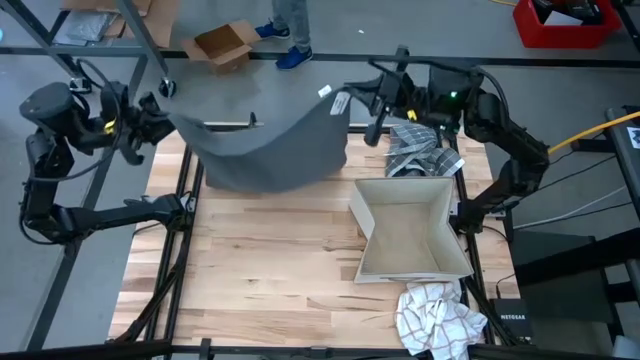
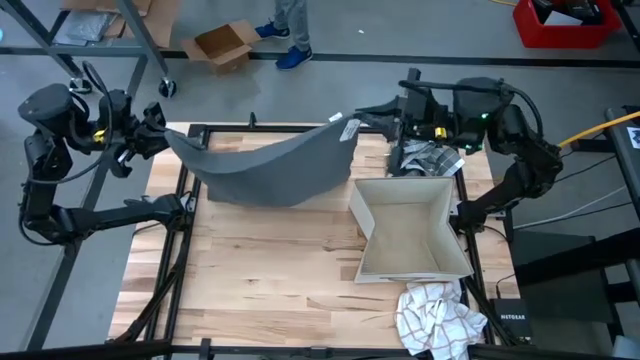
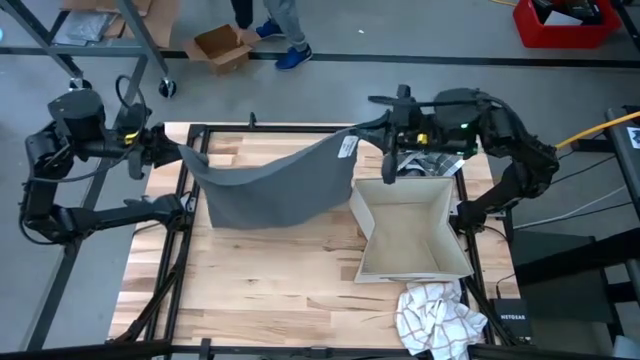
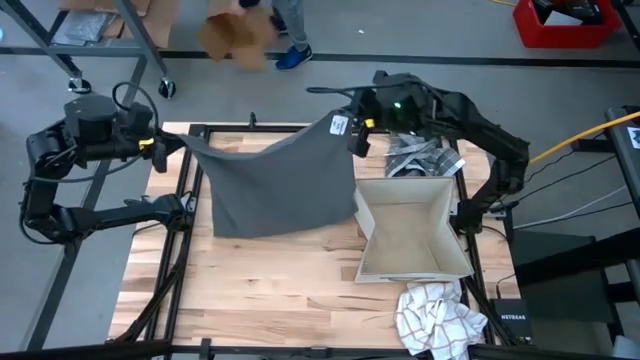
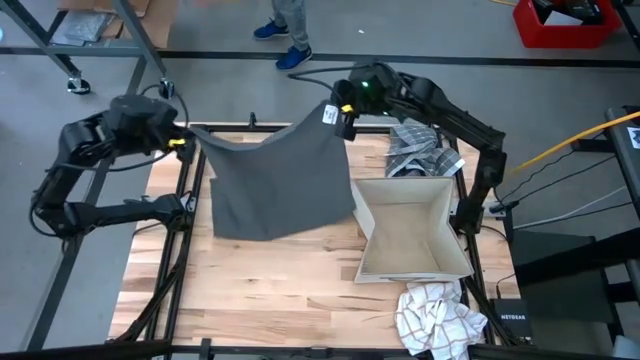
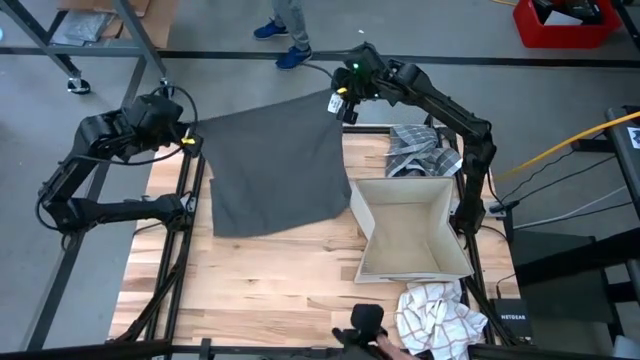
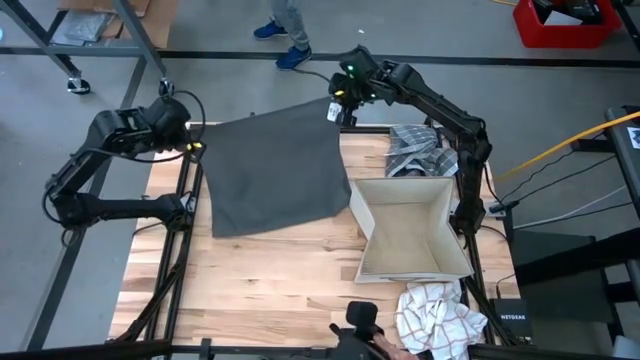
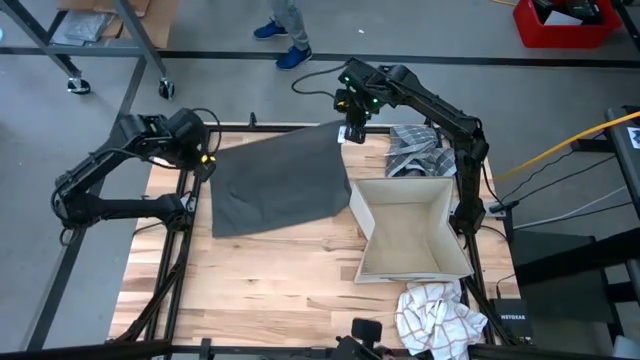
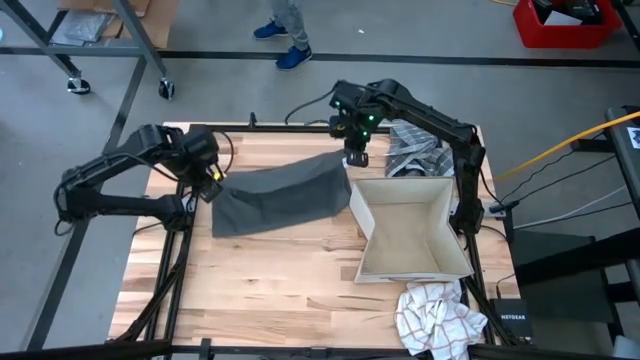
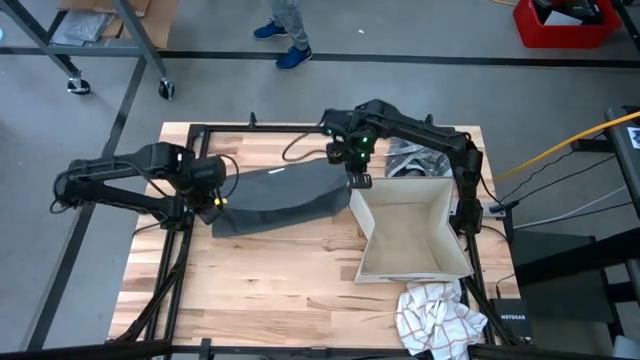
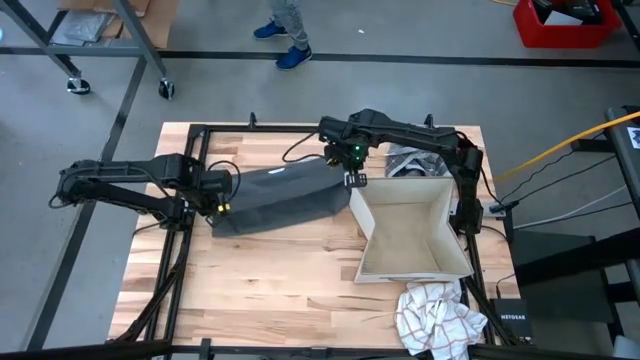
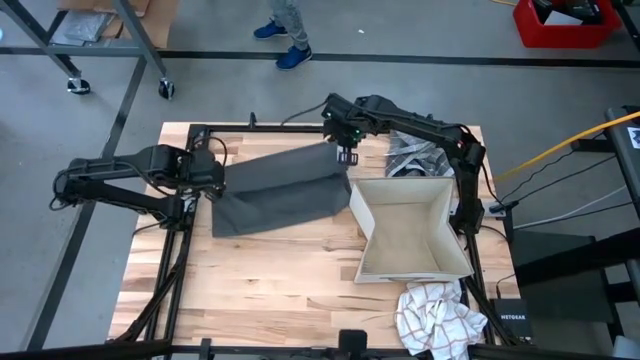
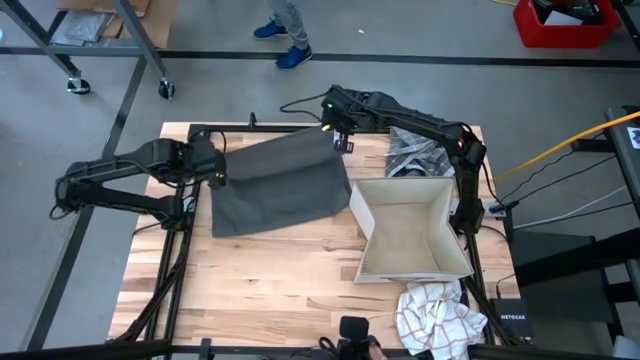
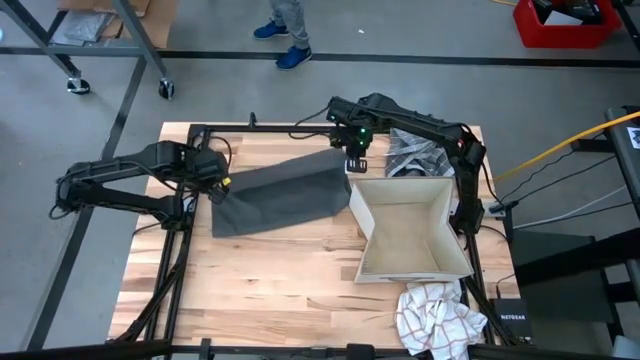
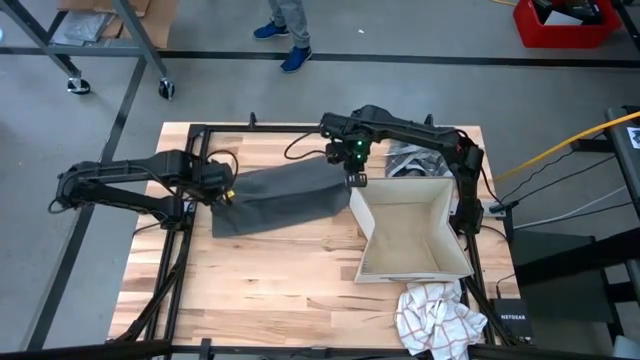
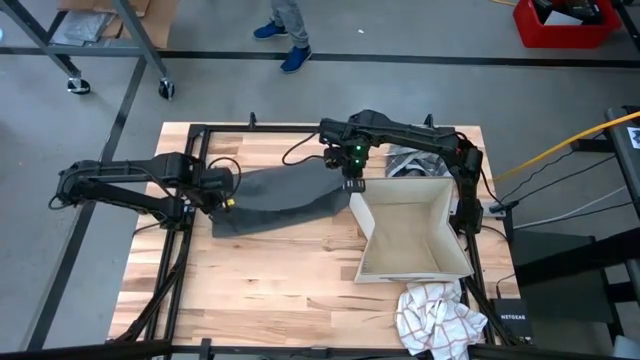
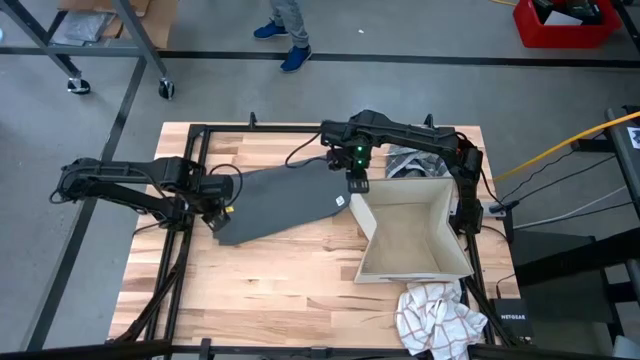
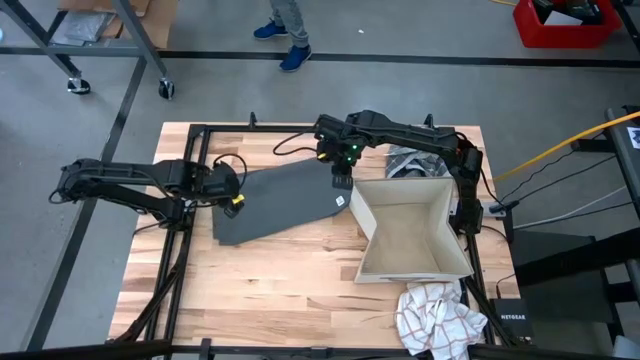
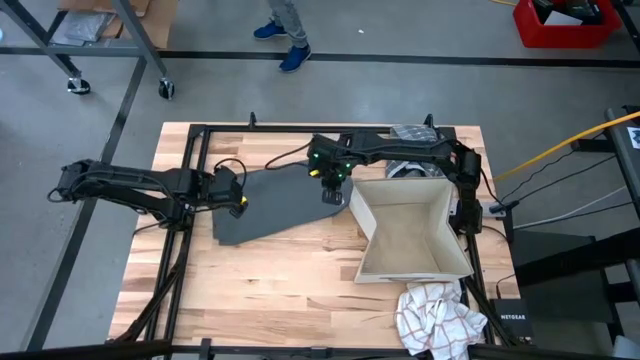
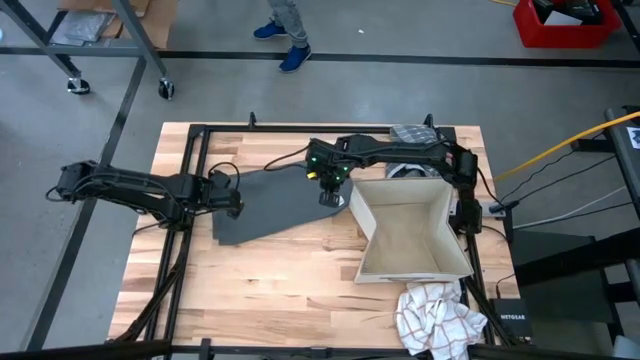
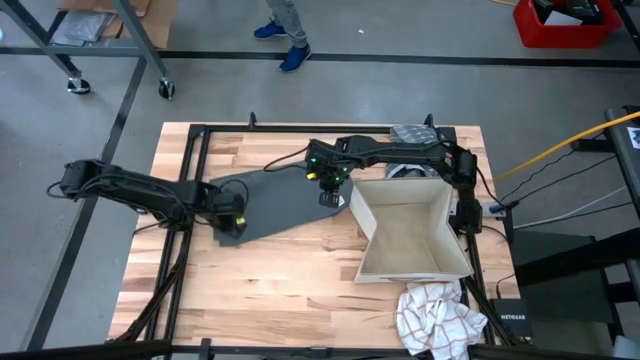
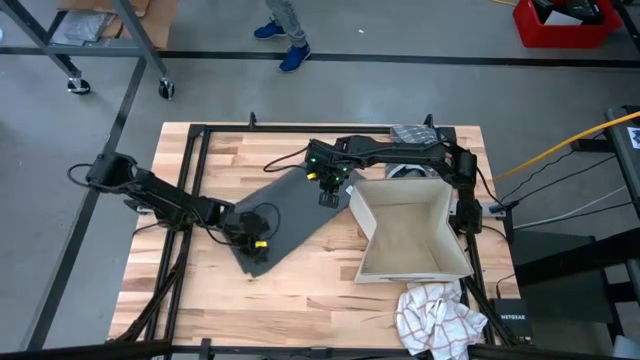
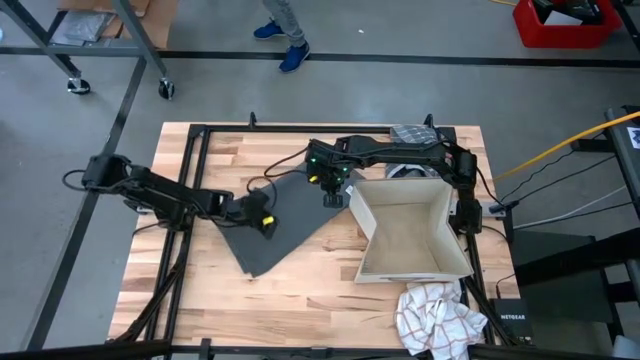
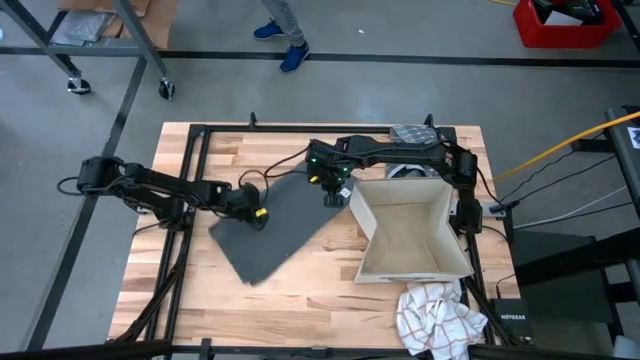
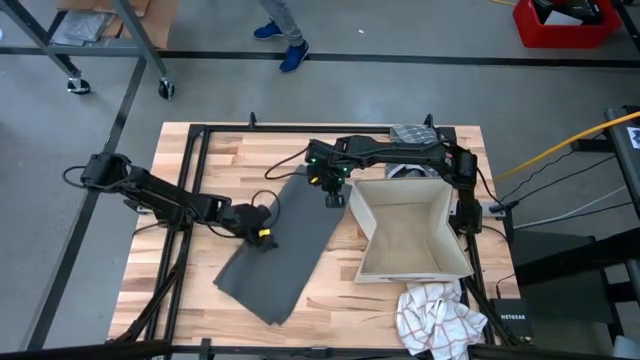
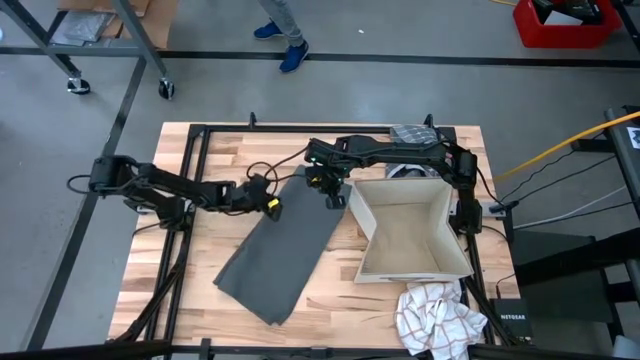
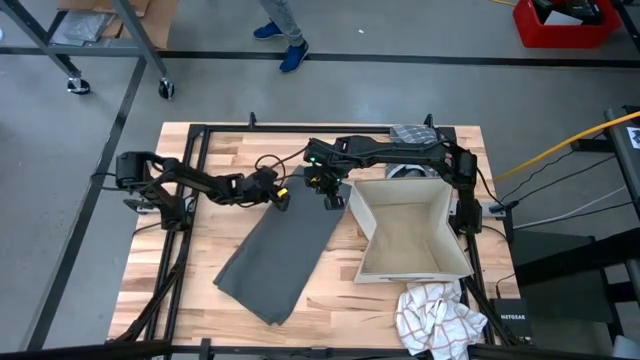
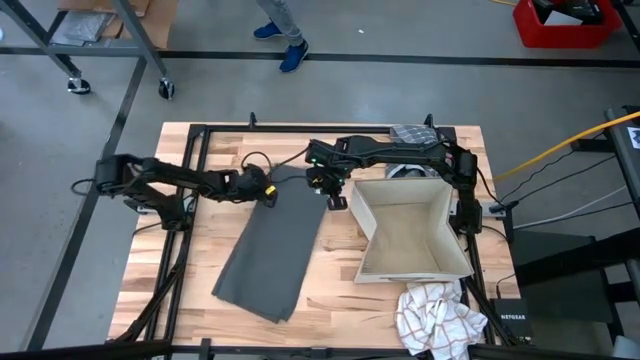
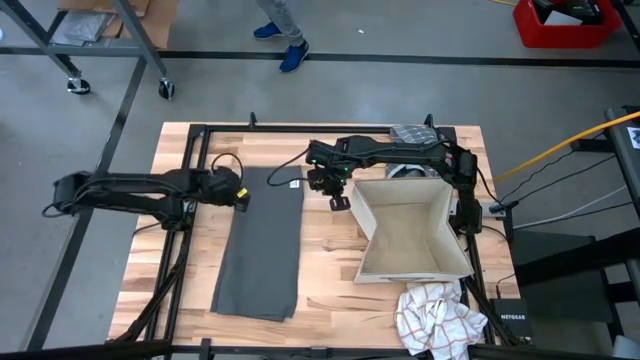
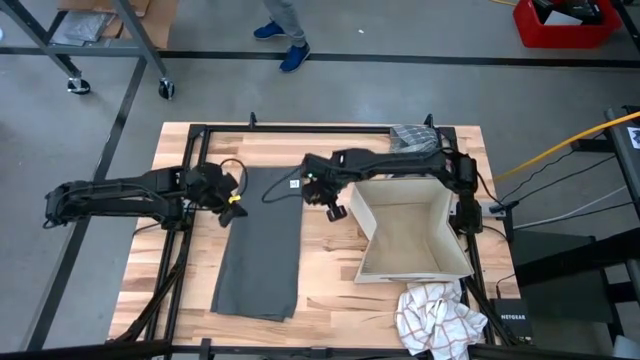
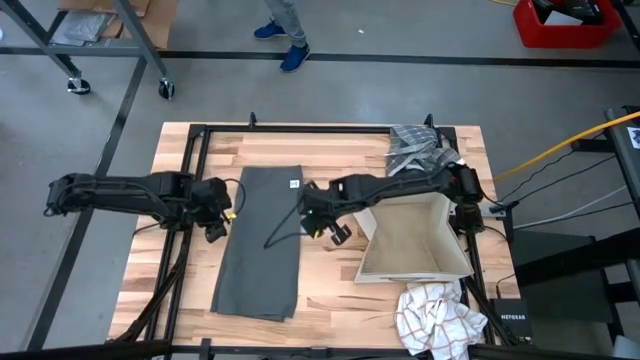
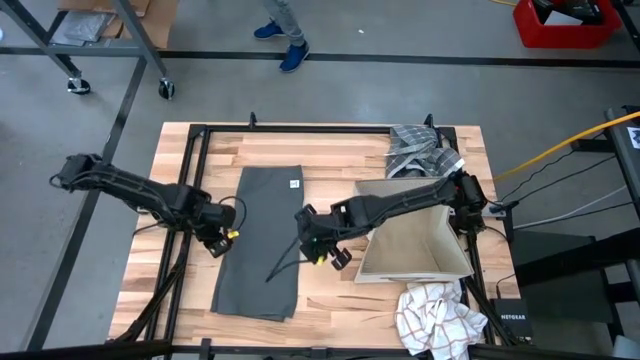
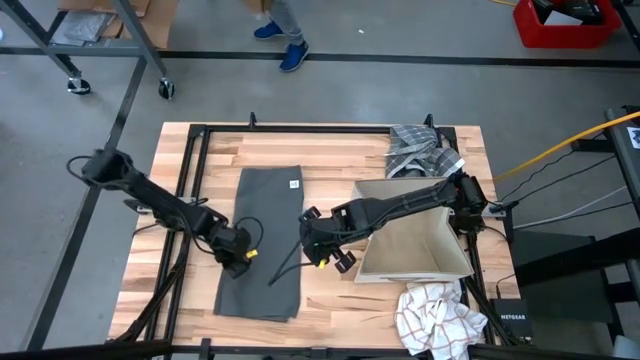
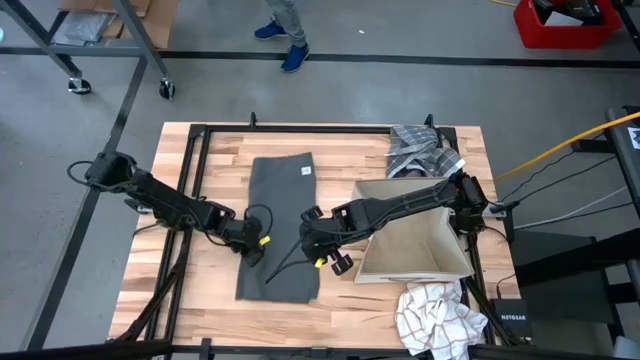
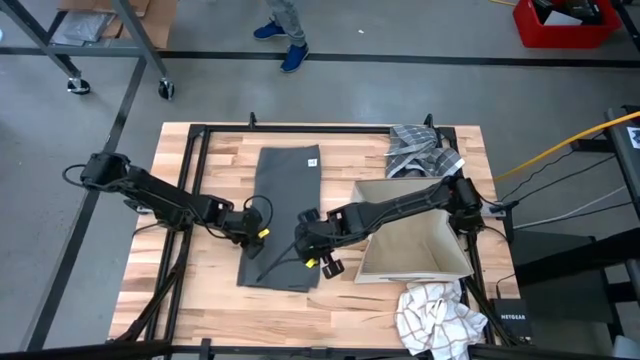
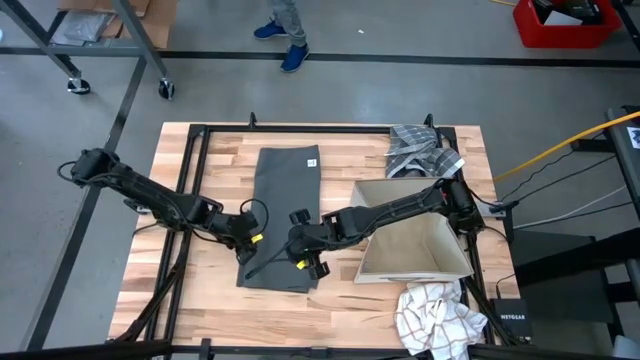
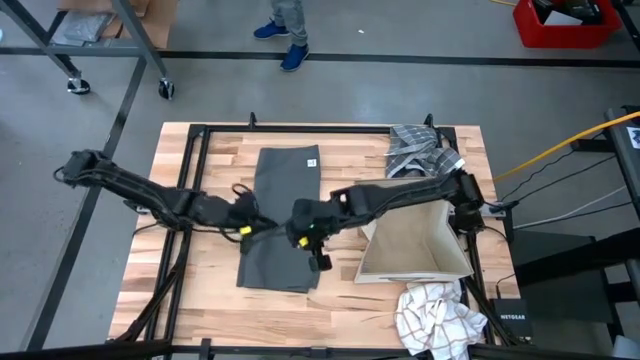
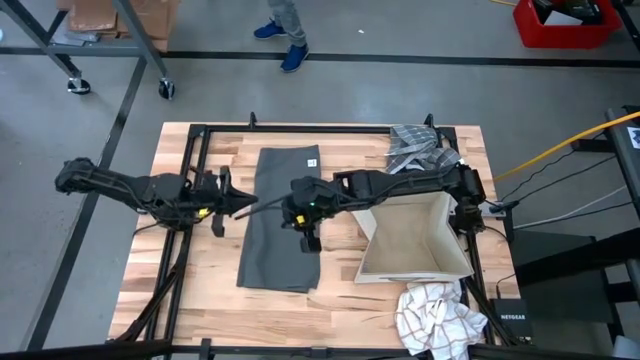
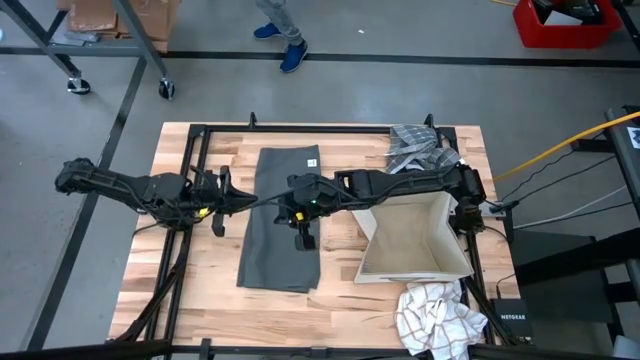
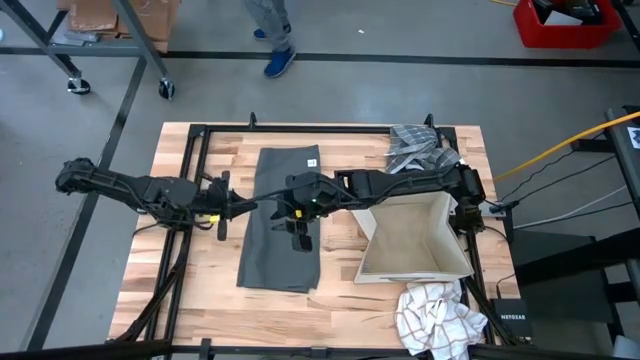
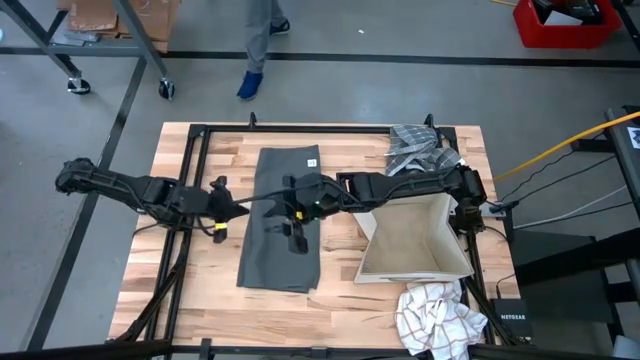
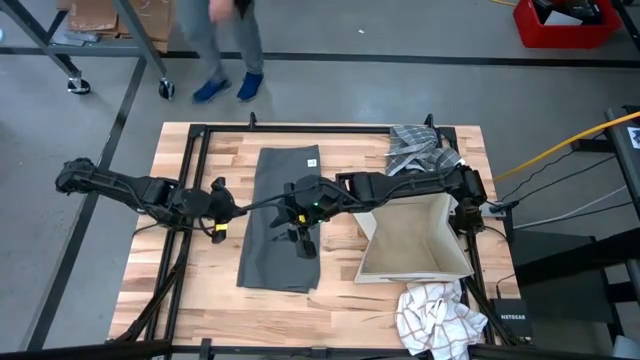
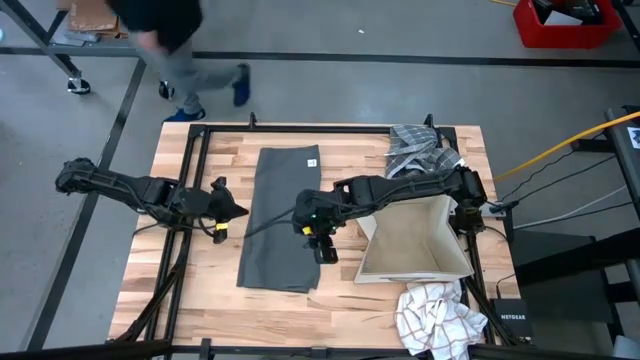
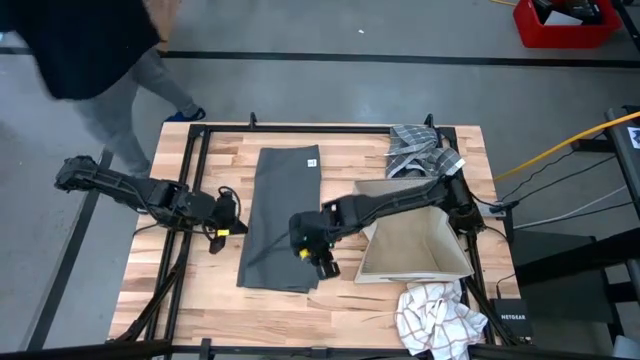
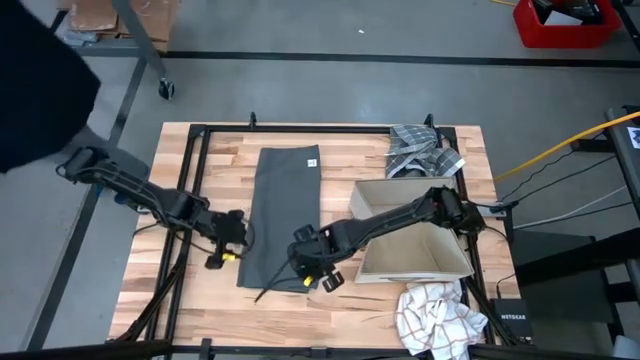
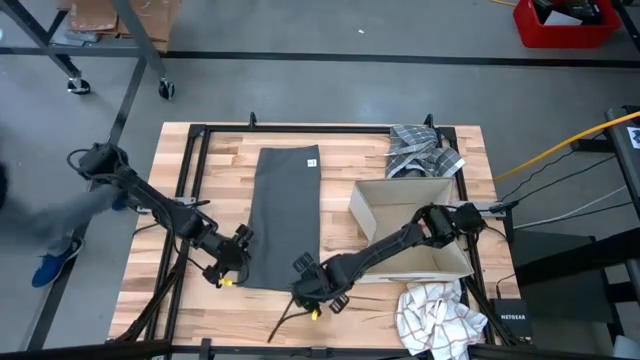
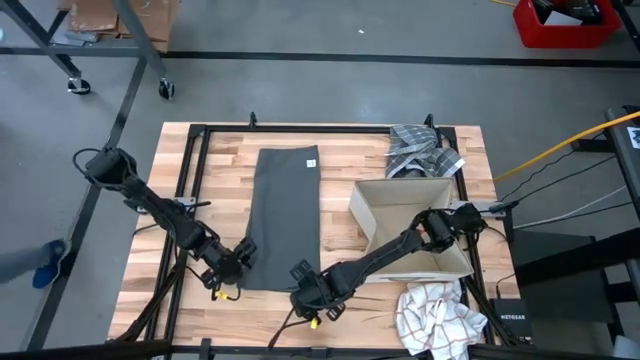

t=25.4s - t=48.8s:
Task: Fold towel
Fold the gray towel
